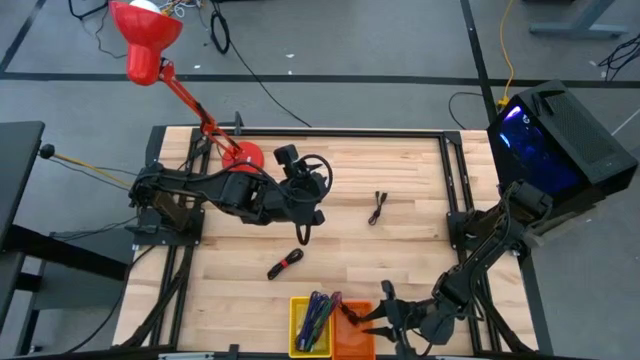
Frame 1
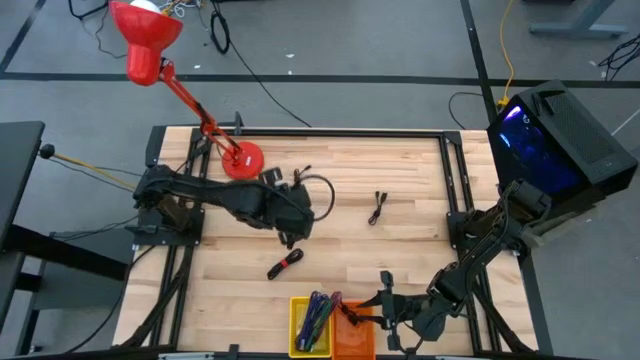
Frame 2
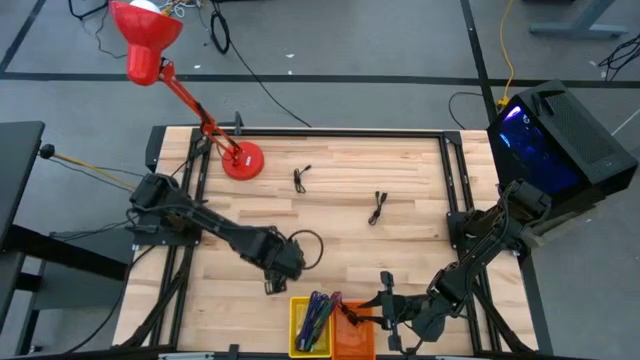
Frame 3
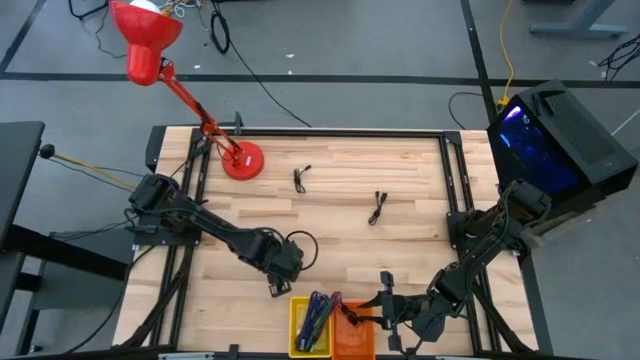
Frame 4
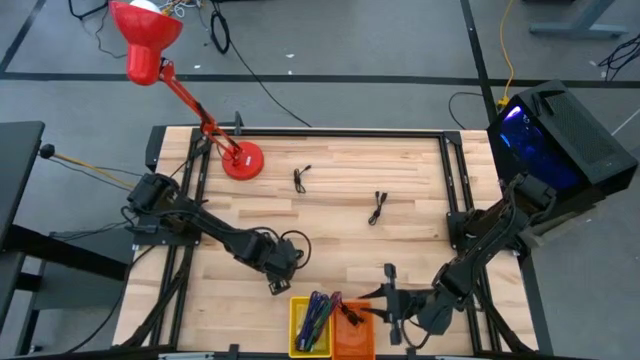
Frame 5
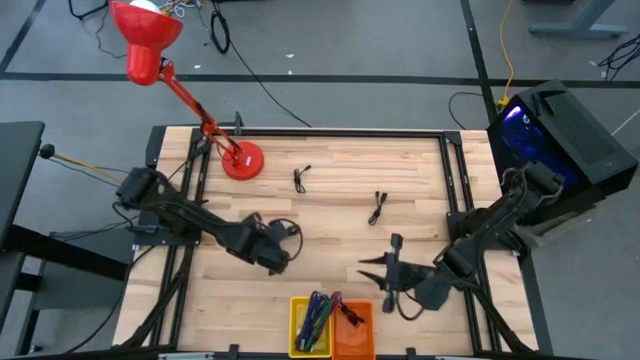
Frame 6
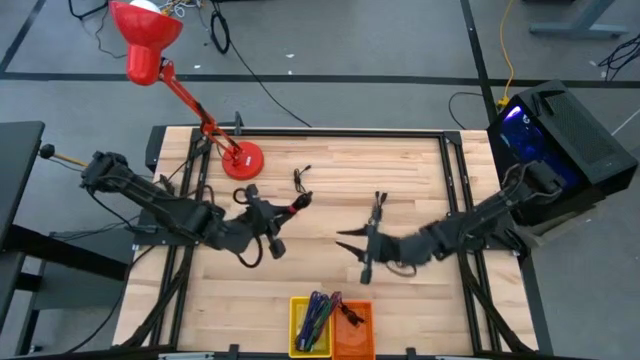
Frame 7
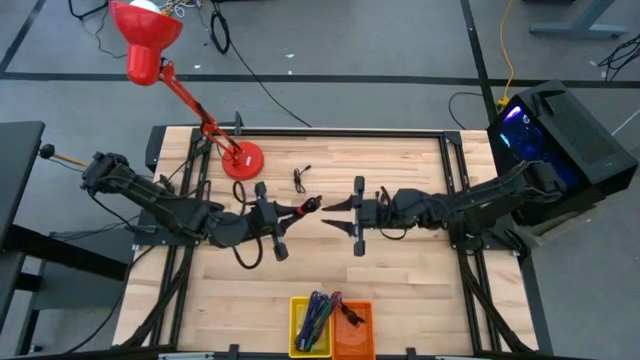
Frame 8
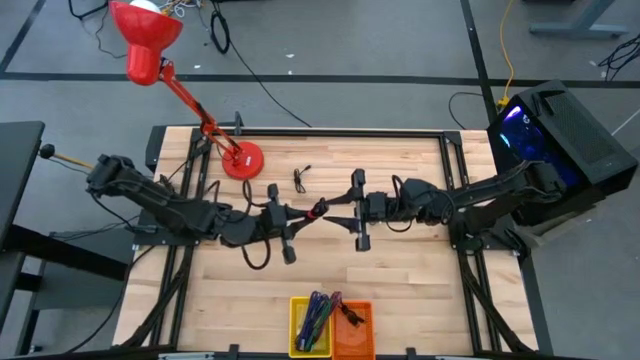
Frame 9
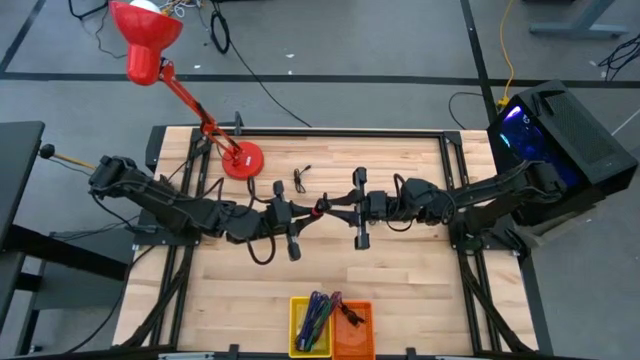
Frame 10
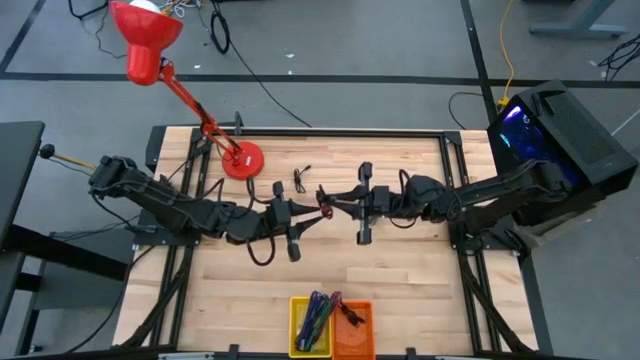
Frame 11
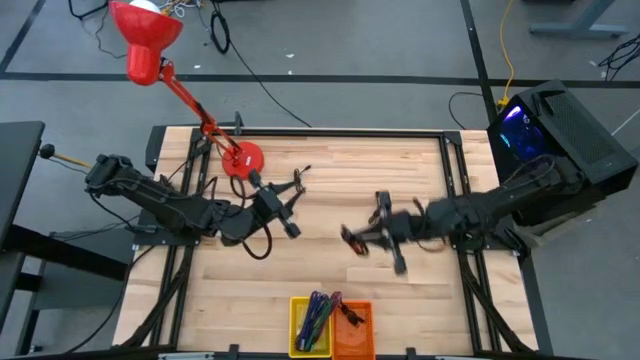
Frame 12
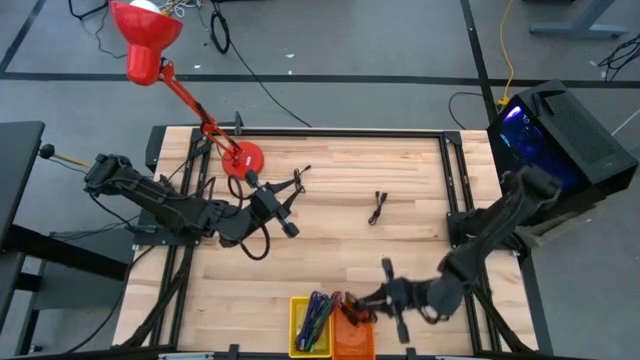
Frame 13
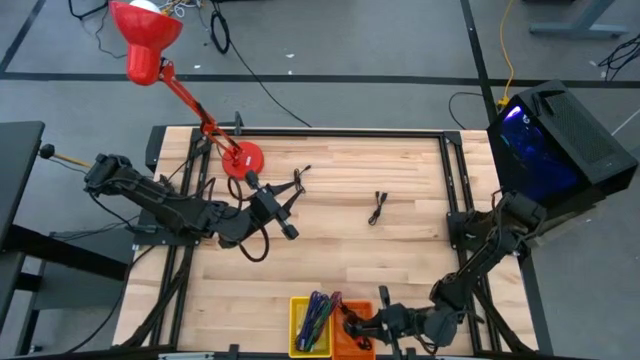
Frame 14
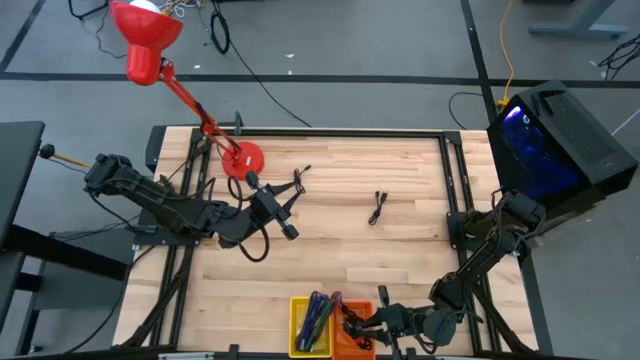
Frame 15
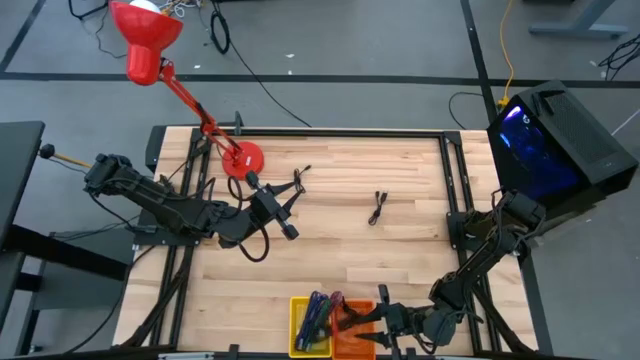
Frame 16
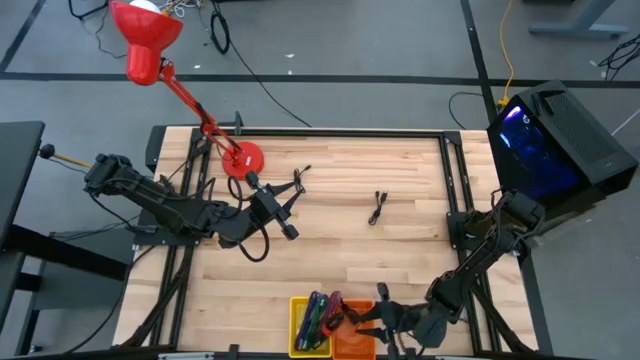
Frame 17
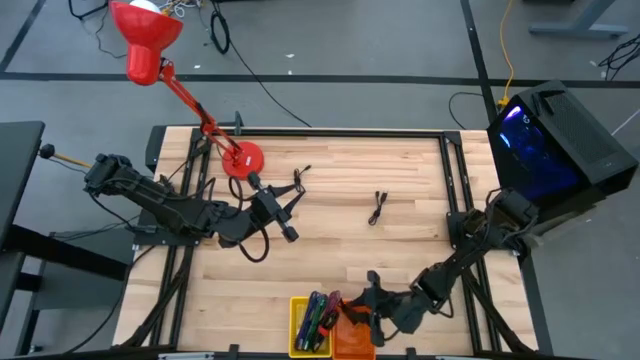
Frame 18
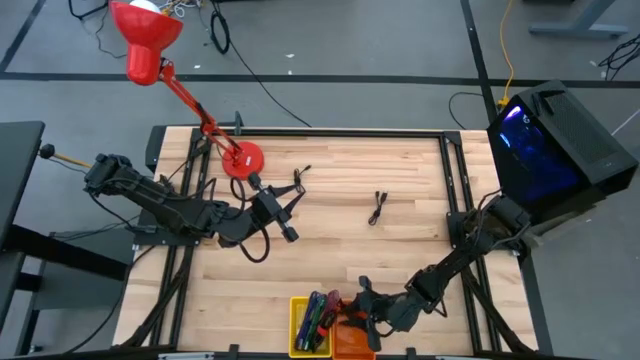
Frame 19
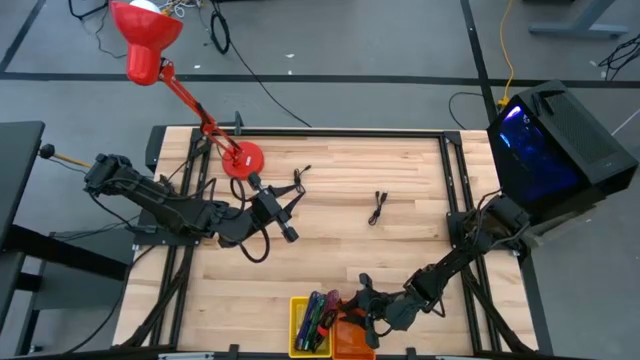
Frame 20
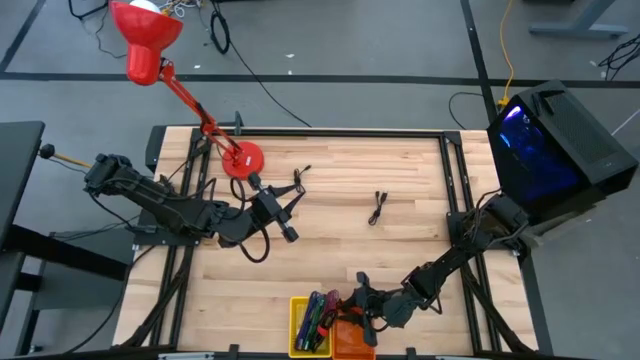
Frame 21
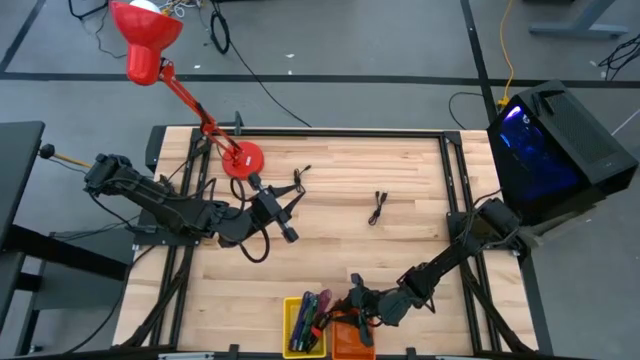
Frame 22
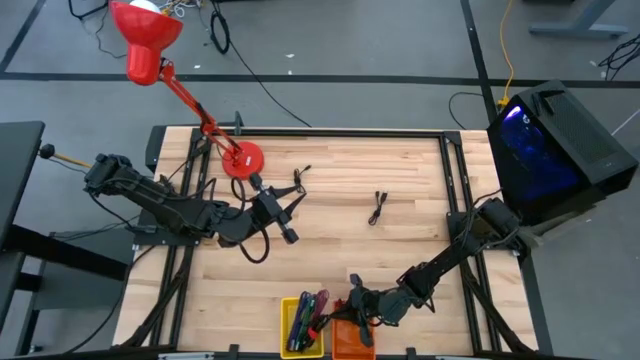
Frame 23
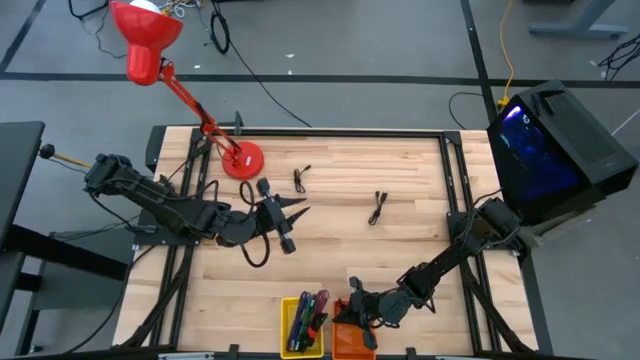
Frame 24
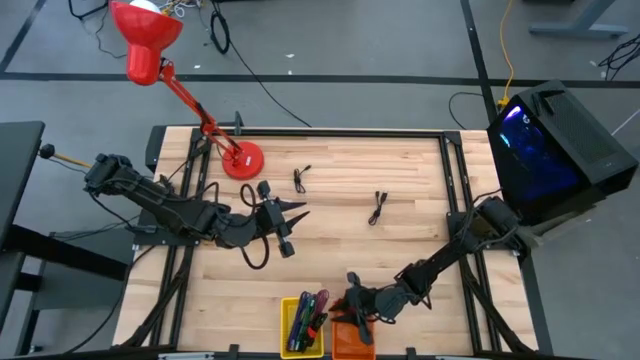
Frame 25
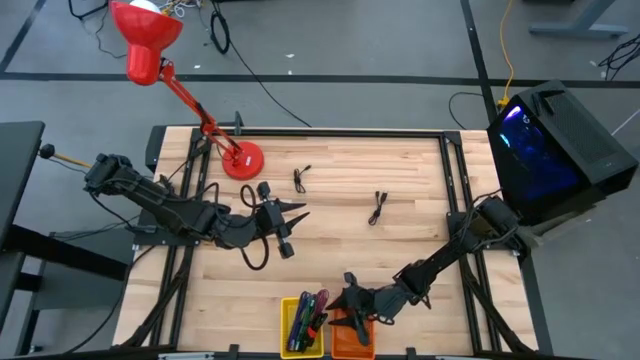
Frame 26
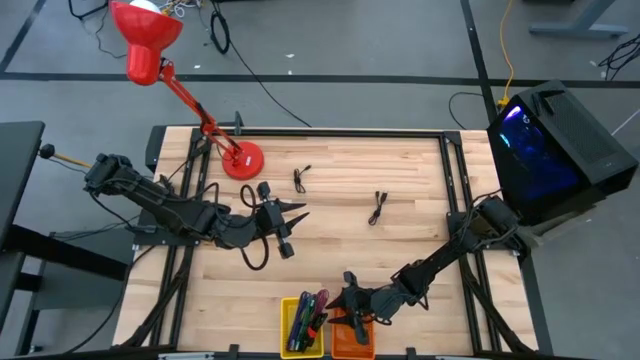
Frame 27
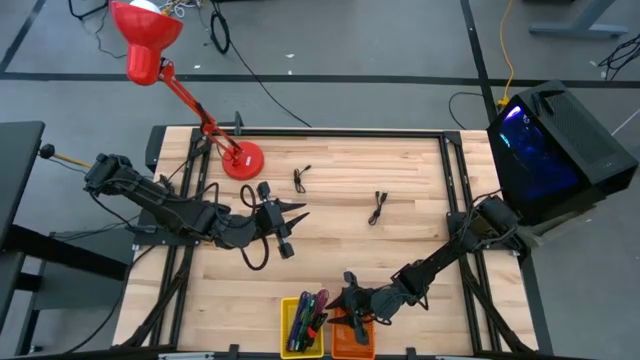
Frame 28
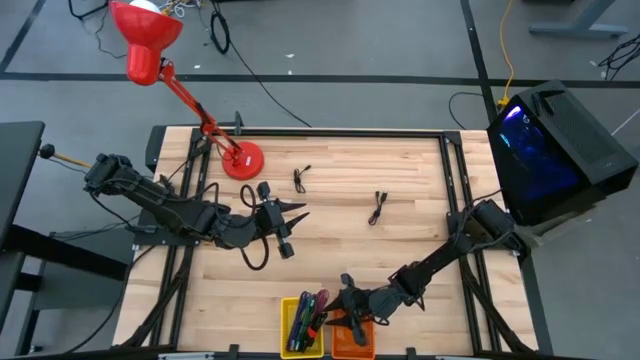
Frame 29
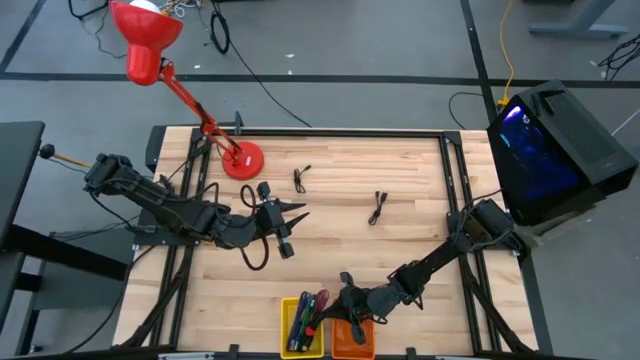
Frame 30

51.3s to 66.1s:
Task: Pick & Place USB Port
Put the bottom black USB cable into the orange bin

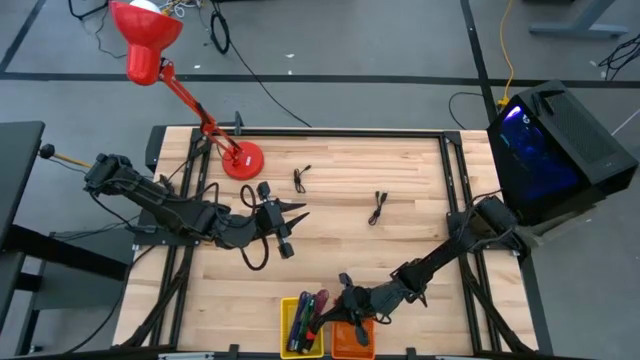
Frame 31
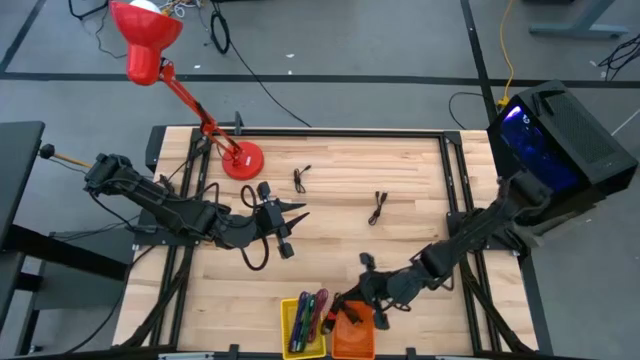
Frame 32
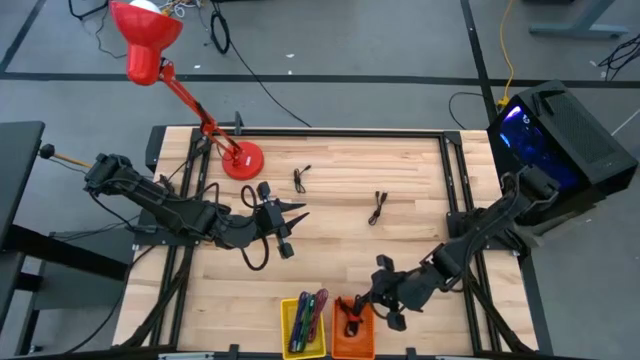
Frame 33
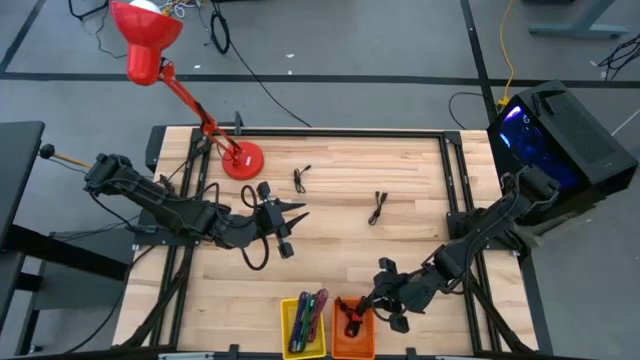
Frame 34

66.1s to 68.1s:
Put the bottom black USB cable into the orange bin

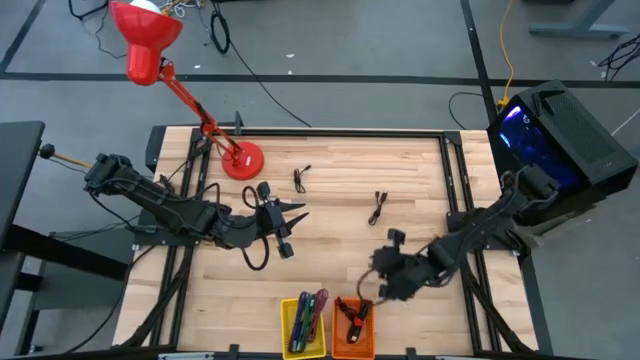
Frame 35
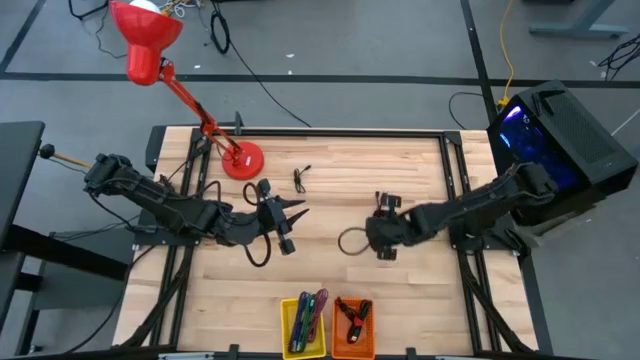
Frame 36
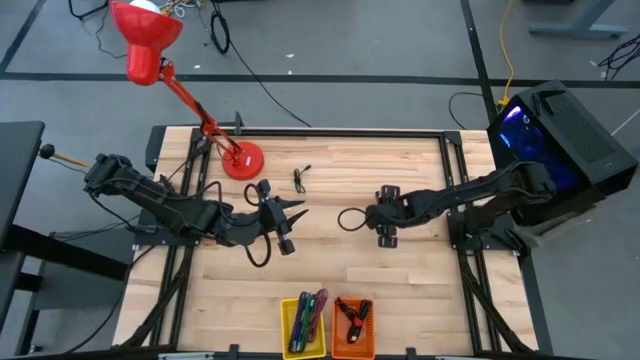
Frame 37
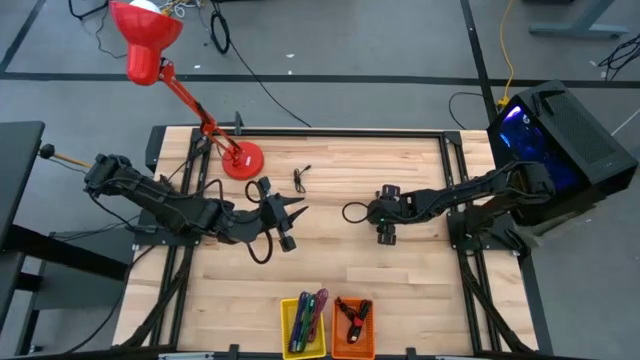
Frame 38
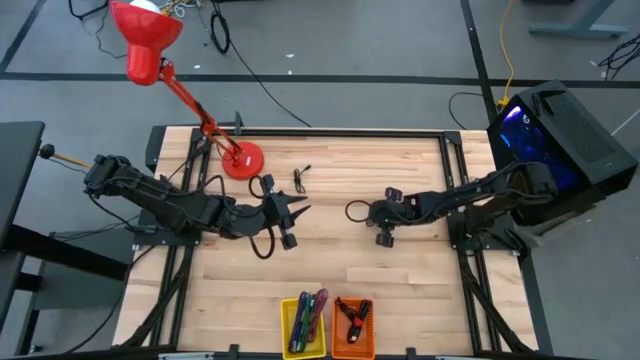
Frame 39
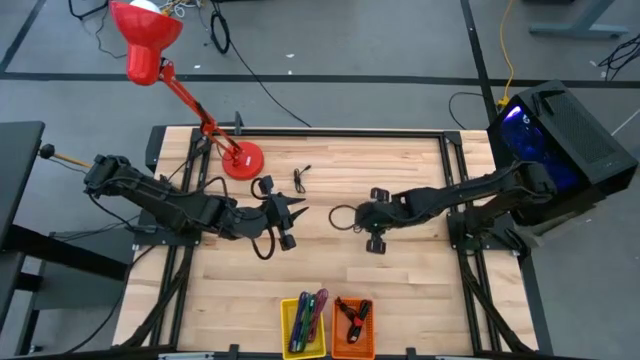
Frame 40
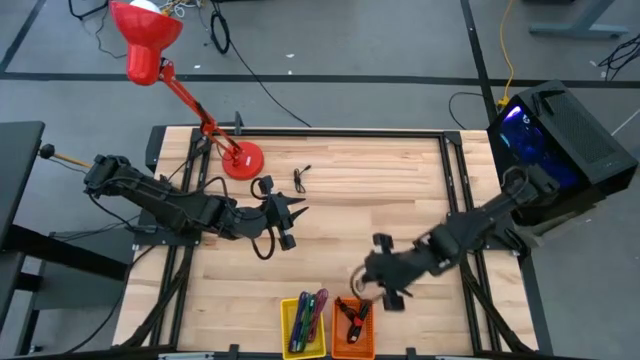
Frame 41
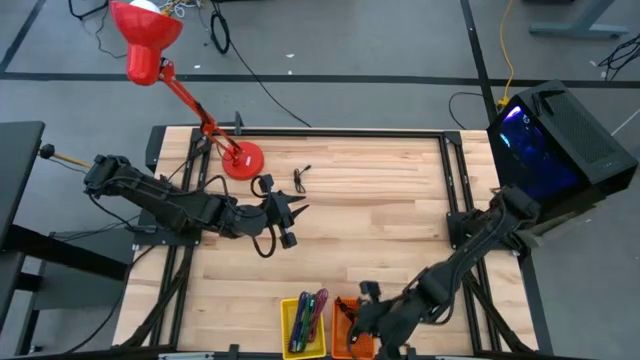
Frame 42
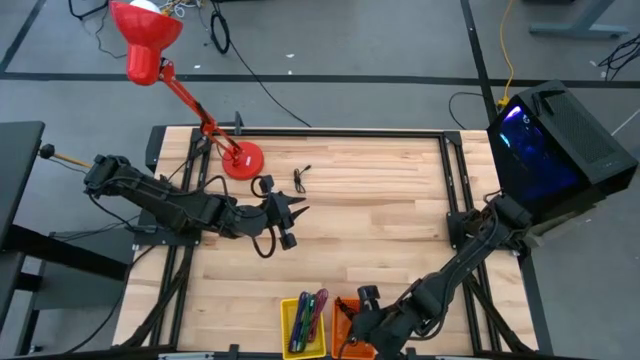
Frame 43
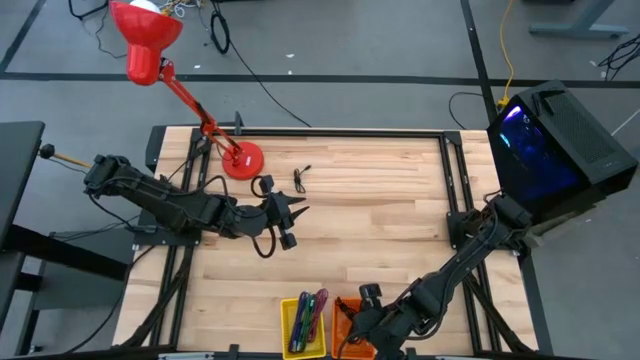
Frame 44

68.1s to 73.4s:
Put the right black USB cable into the orange bin

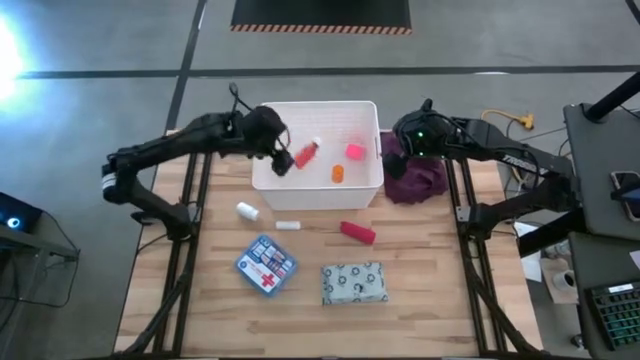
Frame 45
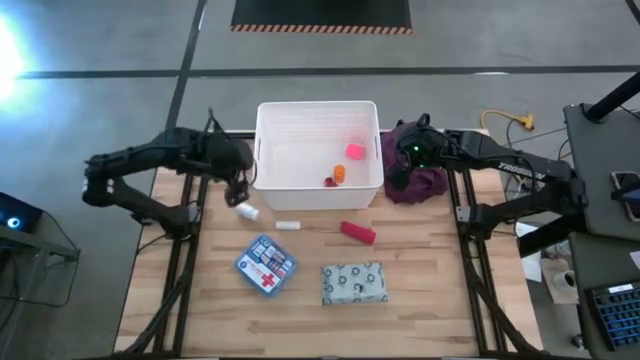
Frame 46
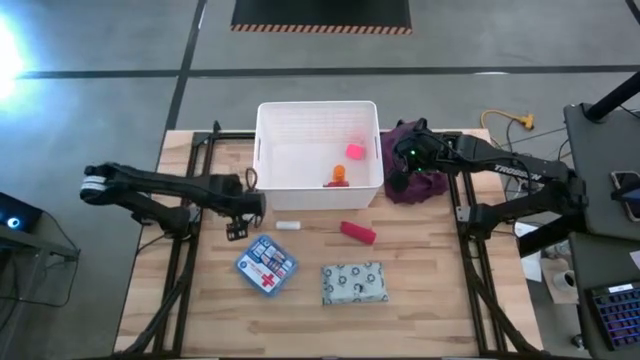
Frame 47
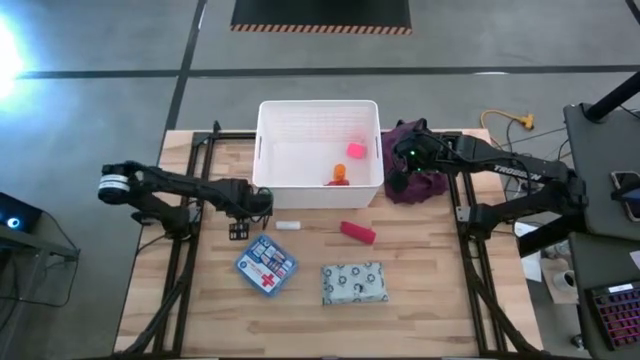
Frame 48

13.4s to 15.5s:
Task: Pick & place medical supplies in basket/bin
Put the white pill bottle into the white bin
